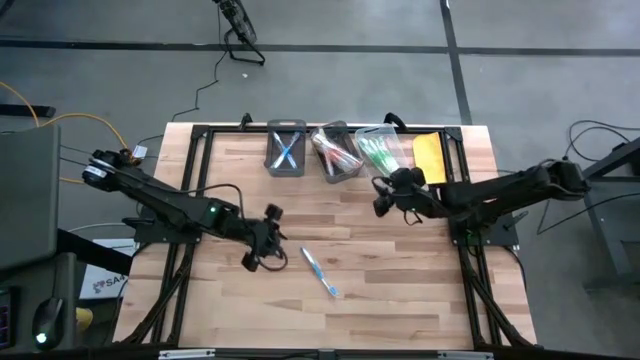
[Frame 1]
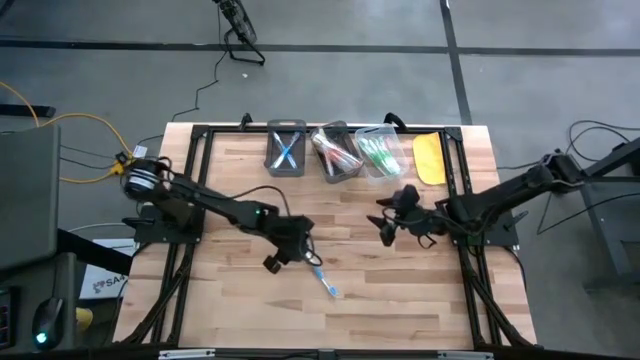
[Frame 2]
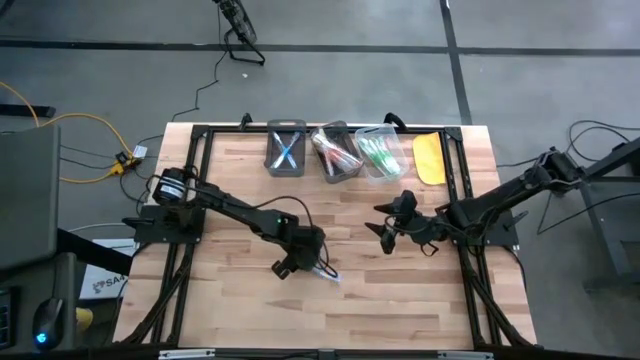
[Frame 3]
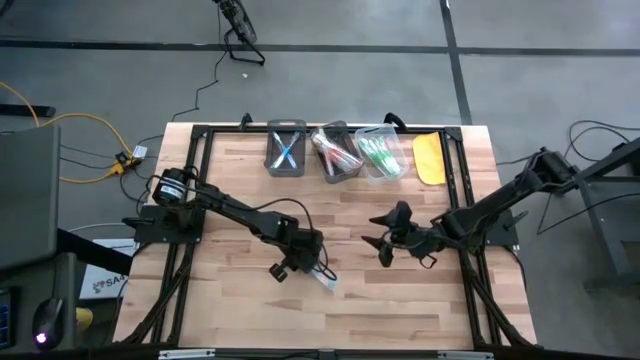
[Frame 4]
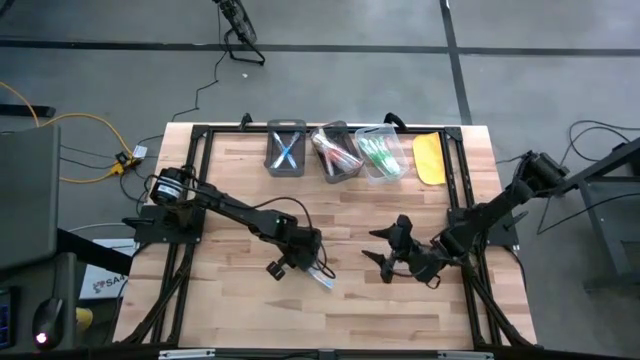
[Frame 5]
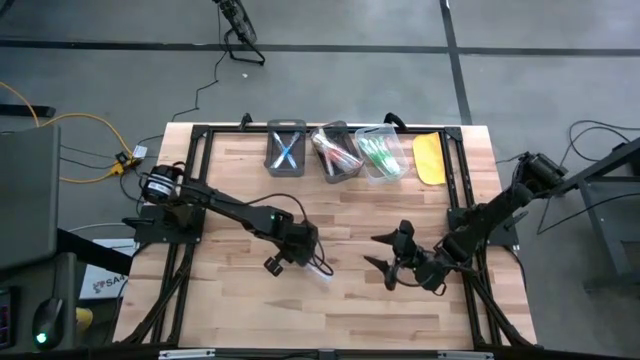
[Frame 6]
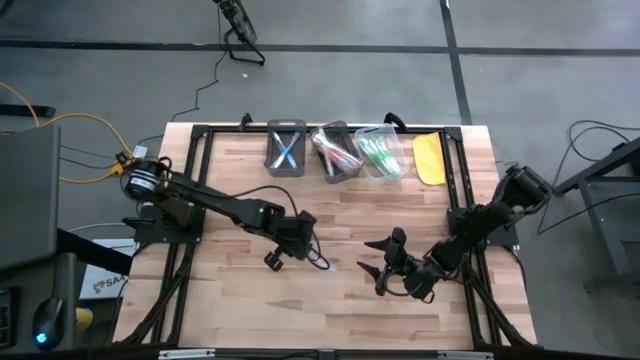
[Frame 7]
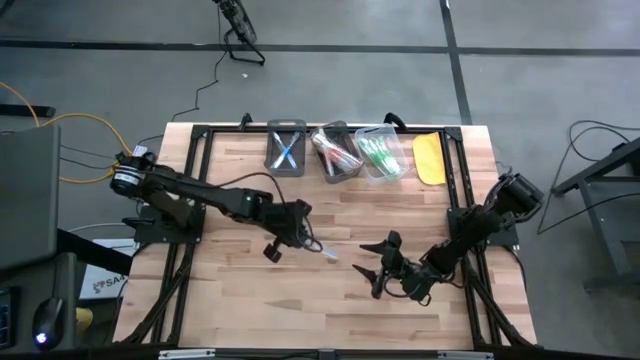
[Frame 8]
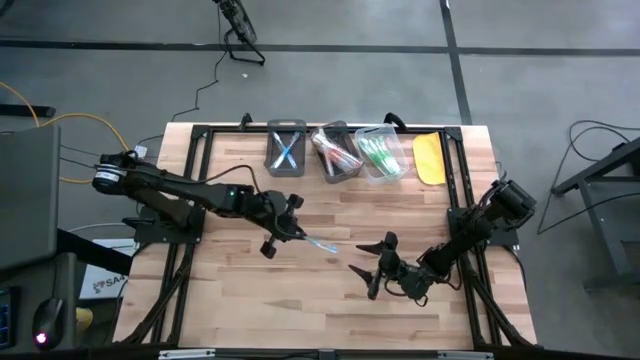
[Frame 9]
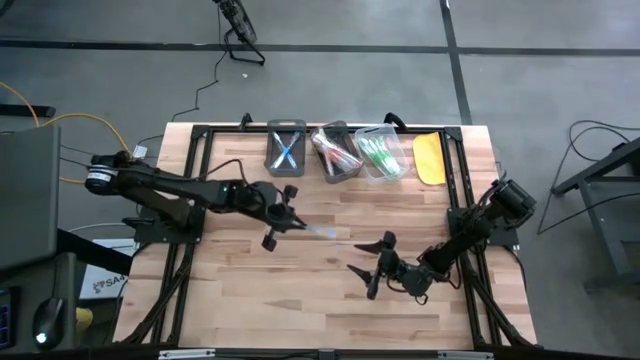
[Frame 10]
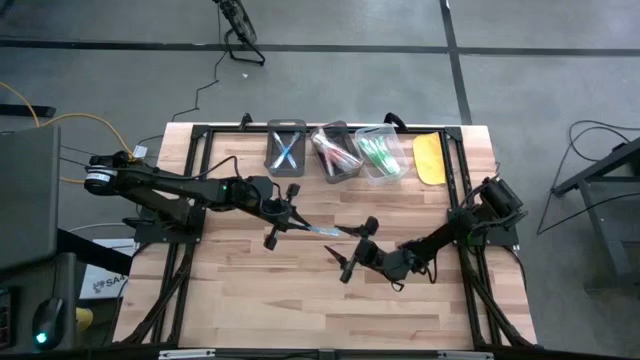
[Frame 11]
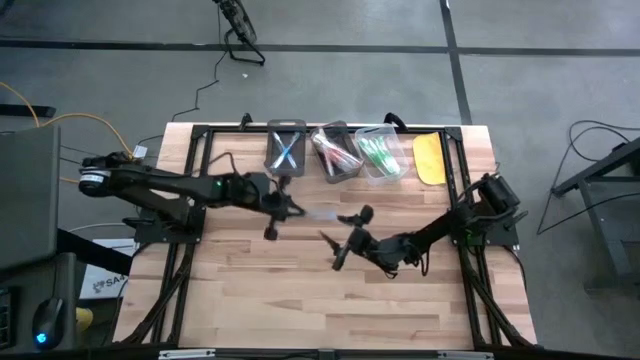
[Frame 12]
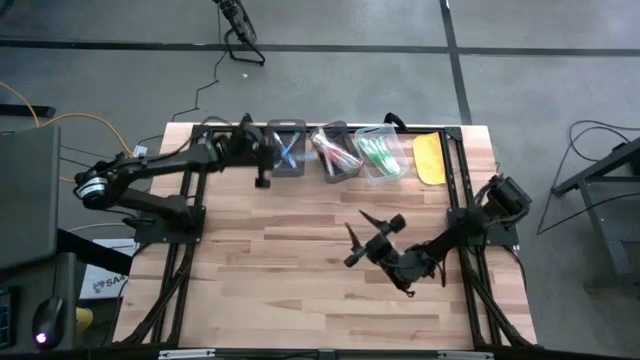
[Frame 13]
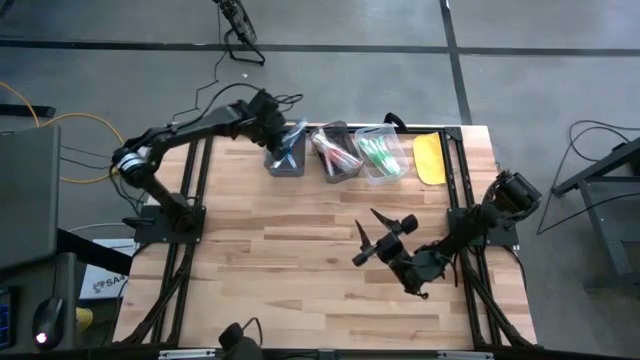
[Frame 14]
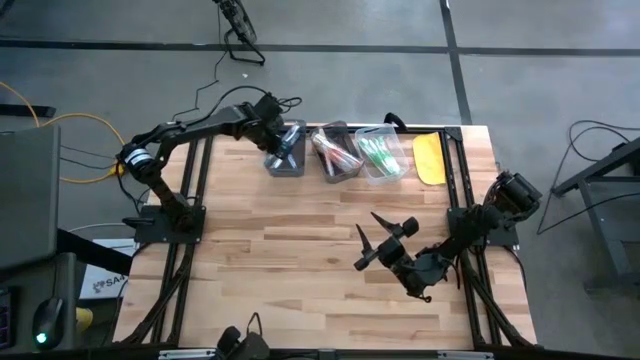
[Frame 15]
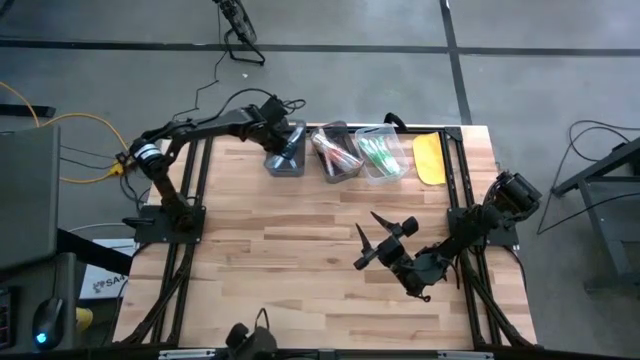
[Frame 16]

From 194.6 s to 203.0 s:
Task: Pick & Place Toothbrushes
Put the blue toothbrush into the left black bin

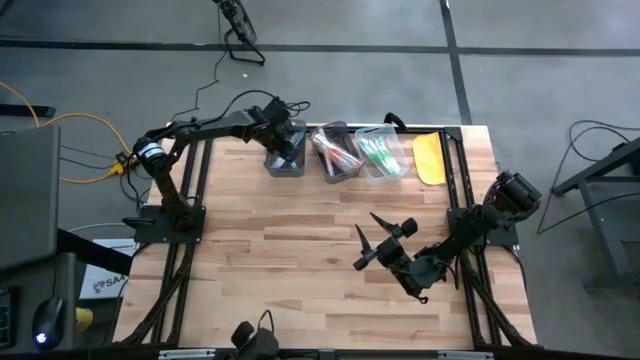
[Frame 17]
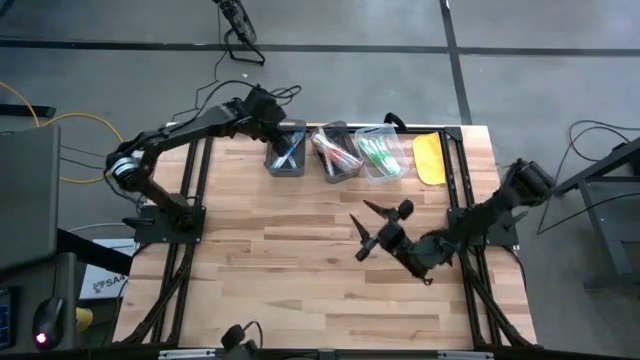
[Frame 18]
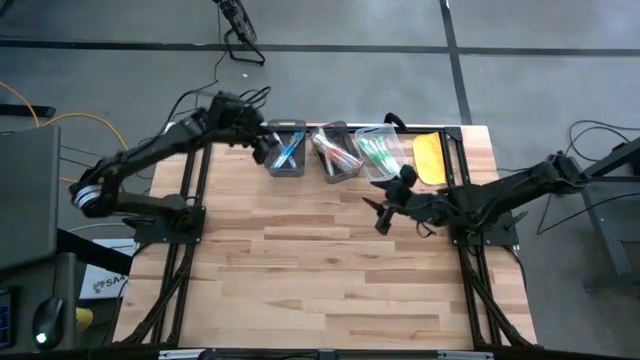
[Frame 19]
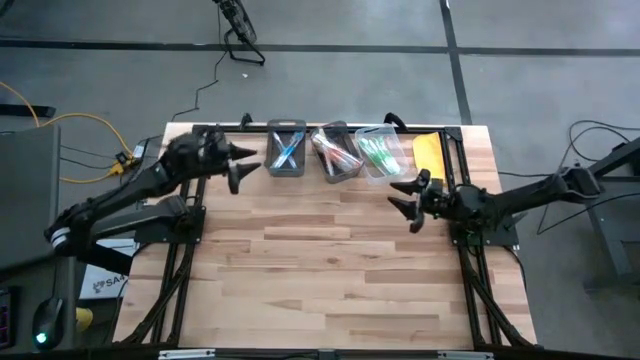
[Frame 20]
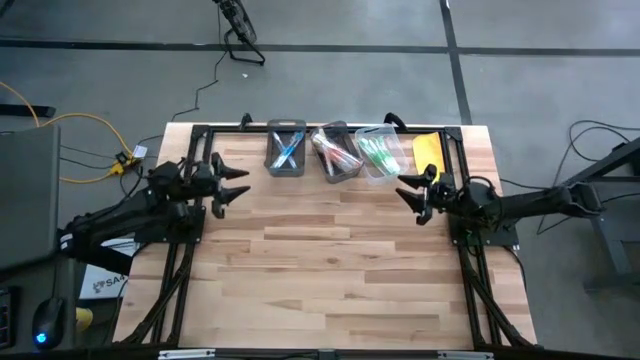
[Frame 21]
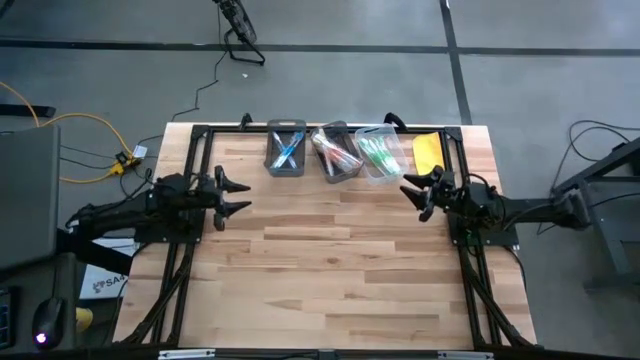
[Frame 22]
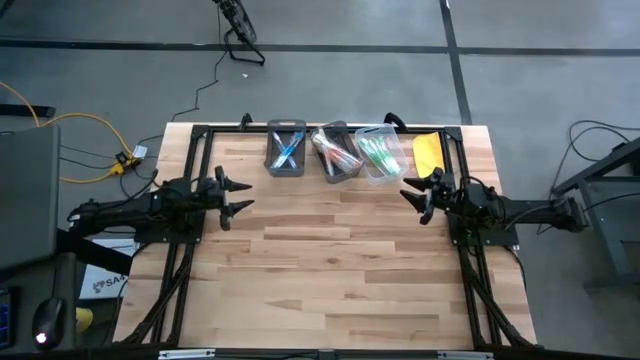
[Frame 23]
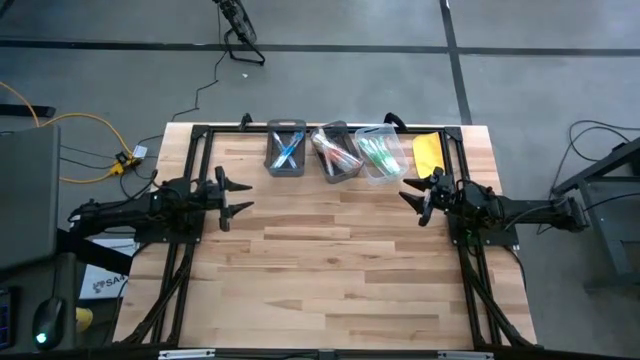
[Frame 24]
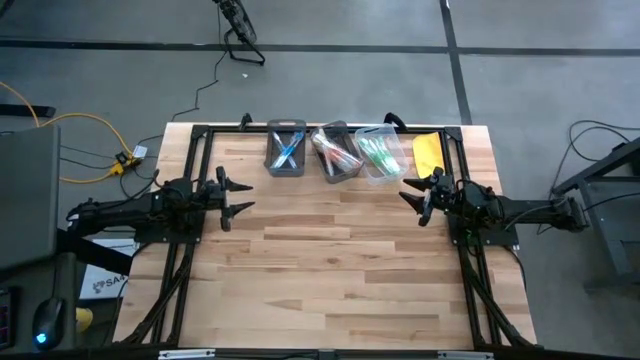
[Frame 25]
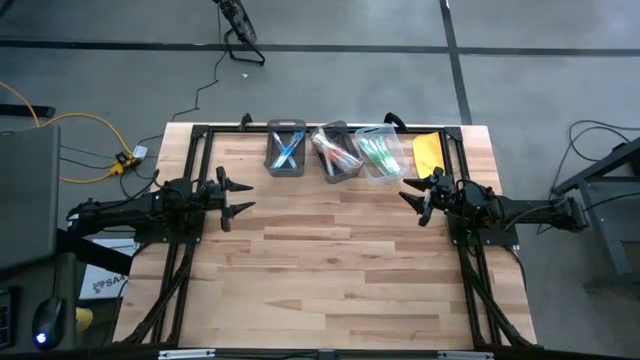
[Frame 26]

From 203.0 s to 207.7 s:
Return to Home Position

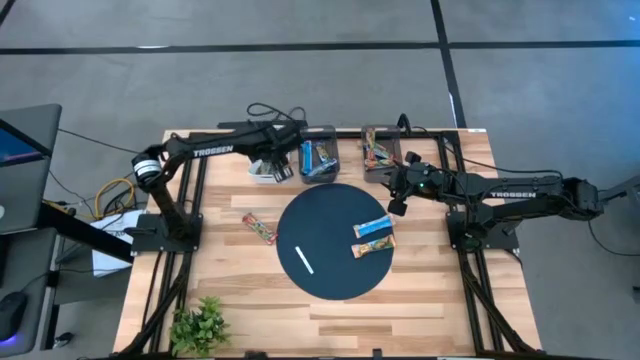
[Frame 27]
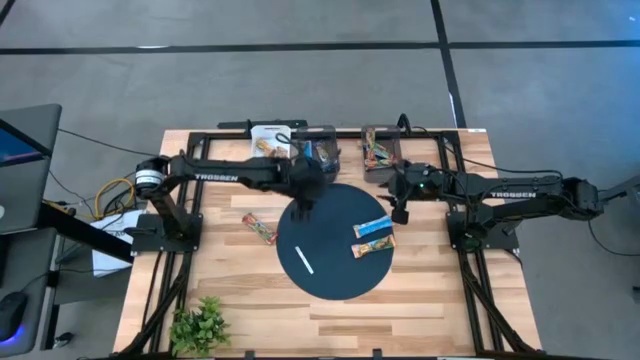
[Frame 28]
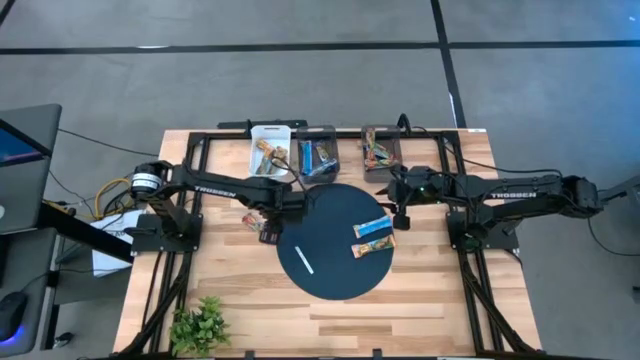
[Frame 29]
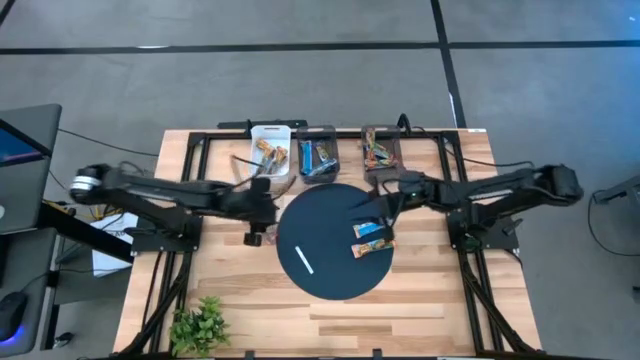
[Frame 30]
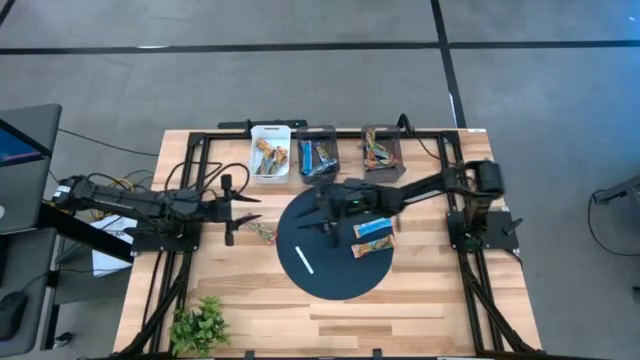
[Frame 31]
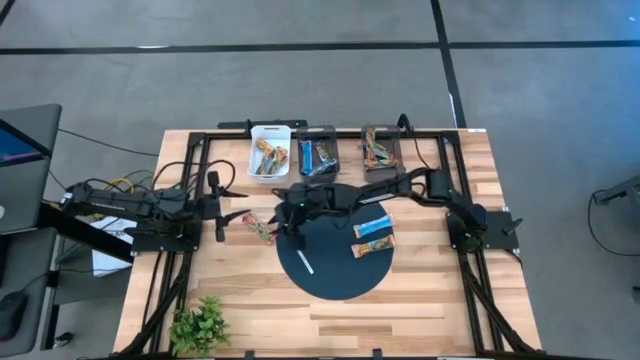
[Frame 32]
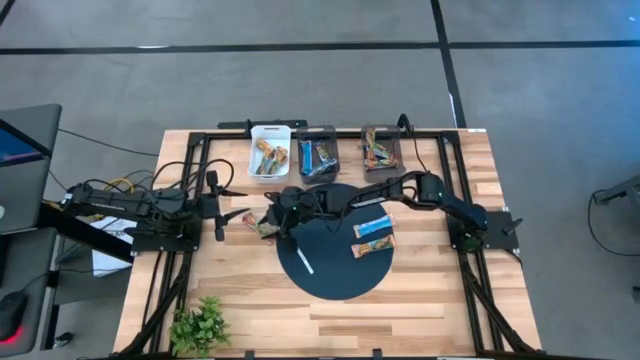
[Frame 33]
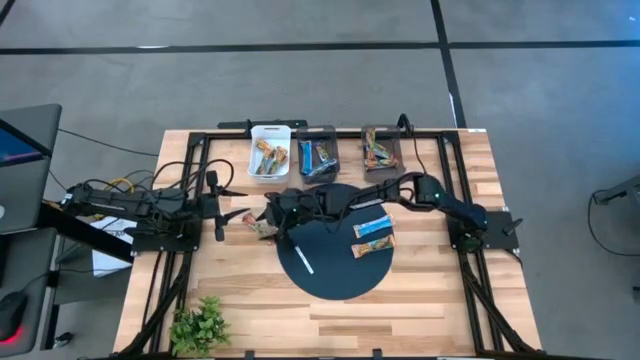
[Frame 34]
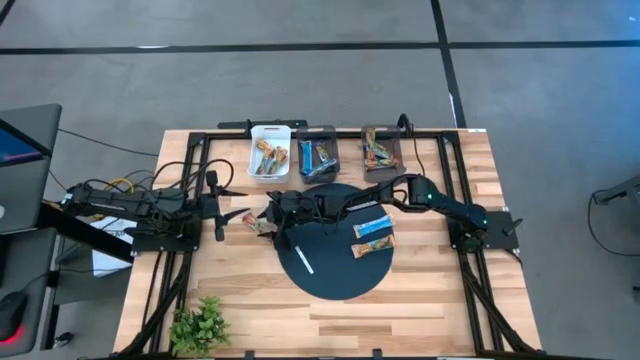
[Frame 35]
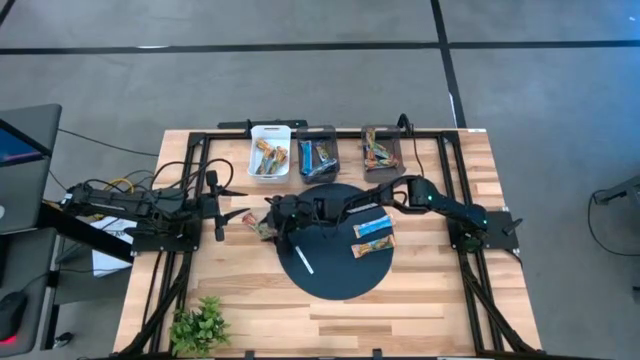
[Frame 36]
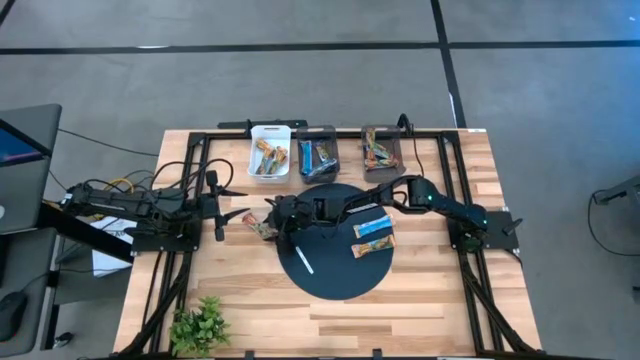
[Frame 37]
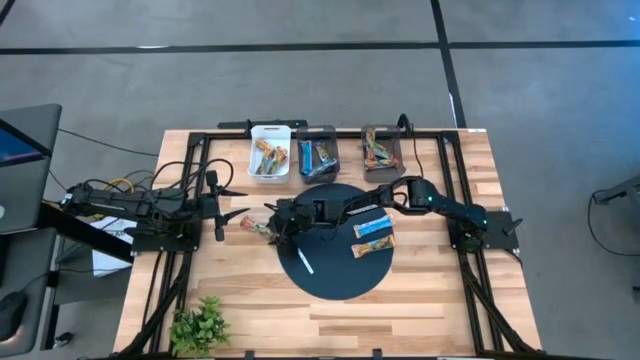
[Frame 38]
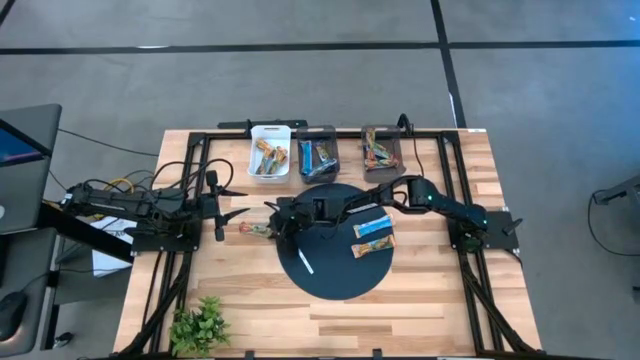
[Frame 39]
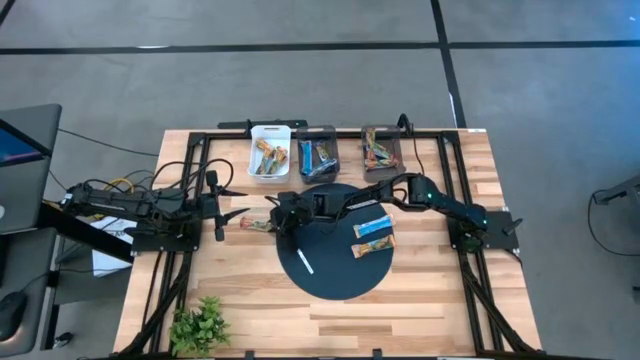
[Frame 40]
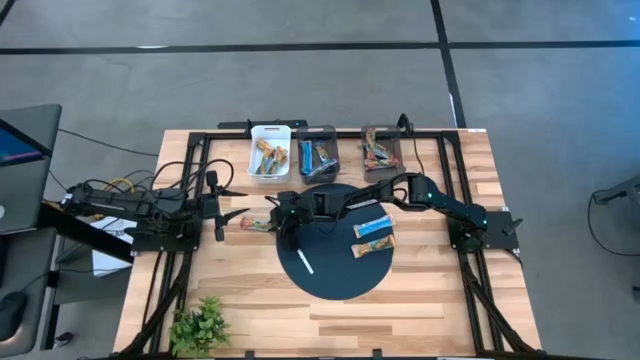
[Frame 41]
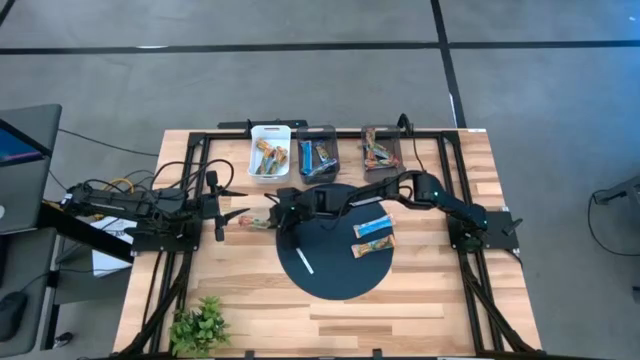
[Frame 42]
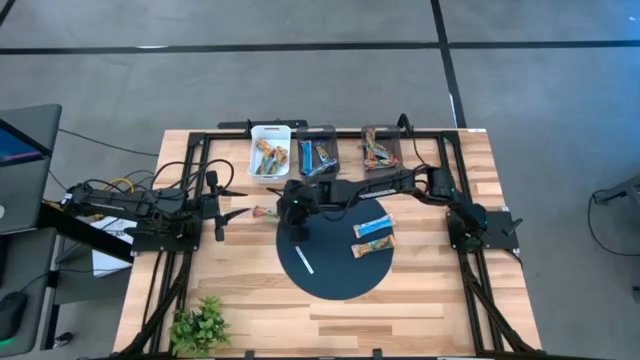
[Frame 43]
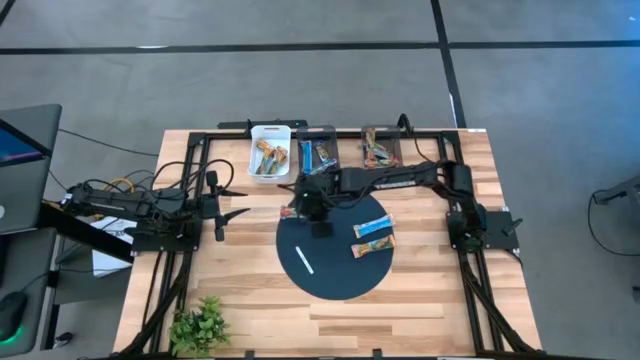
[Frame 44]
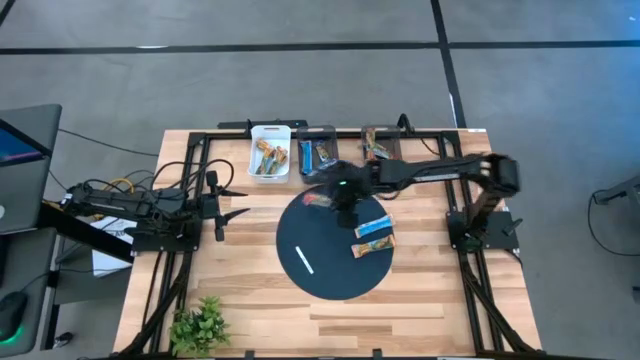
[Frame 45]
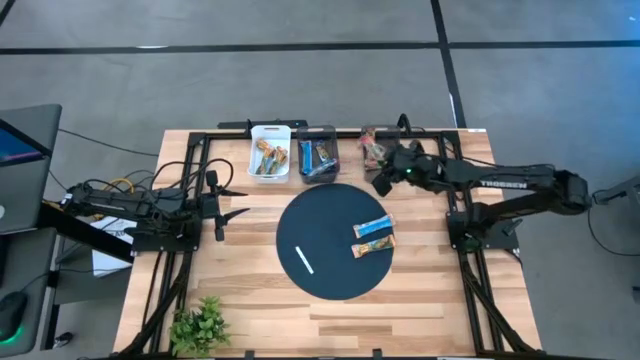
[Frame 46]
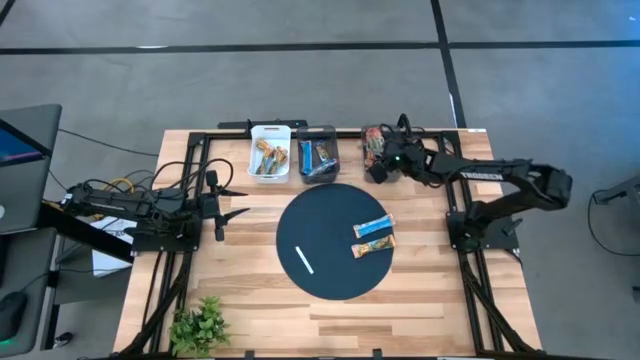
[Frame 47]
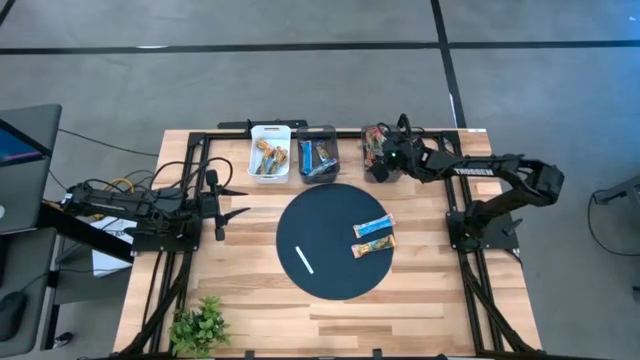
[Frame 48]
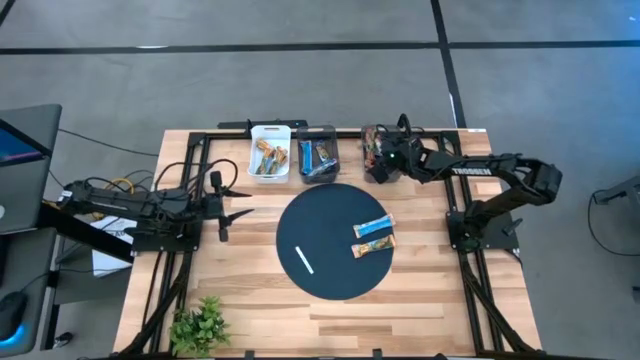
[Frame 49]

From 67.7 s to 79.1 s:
Task: Pick and place Granola Bars by type
Put the red granola bar into the right black bin
